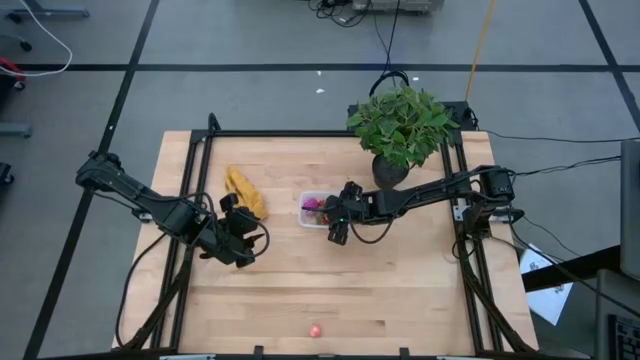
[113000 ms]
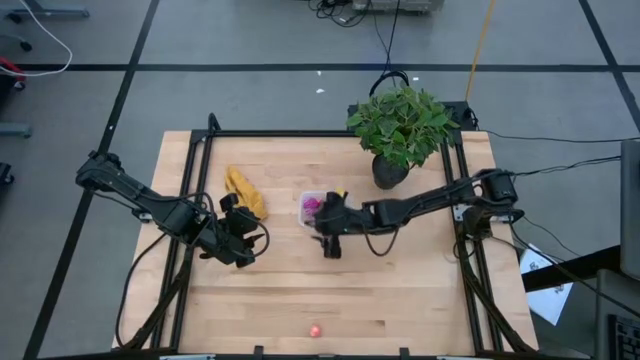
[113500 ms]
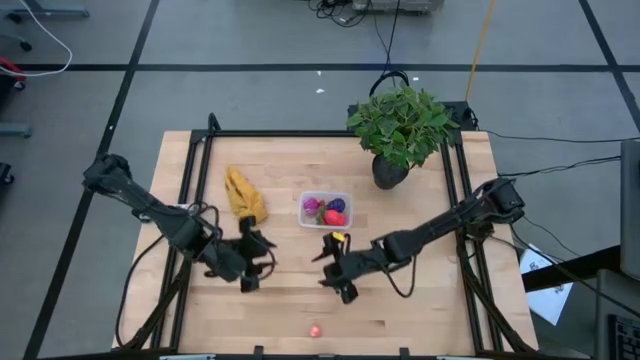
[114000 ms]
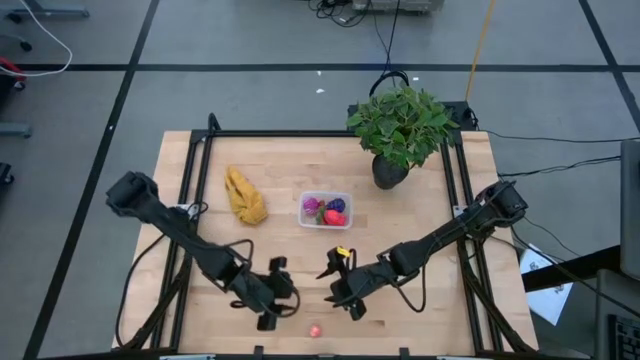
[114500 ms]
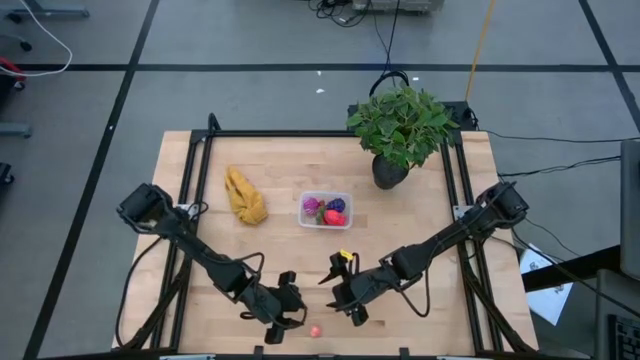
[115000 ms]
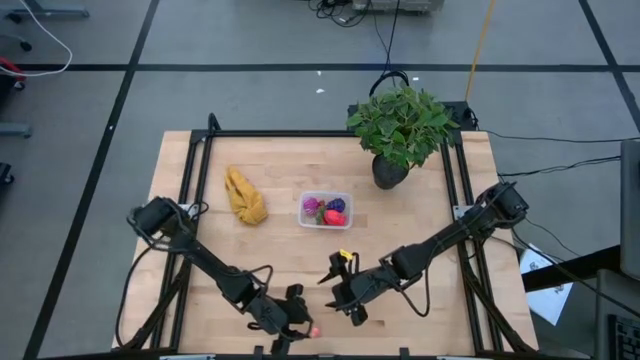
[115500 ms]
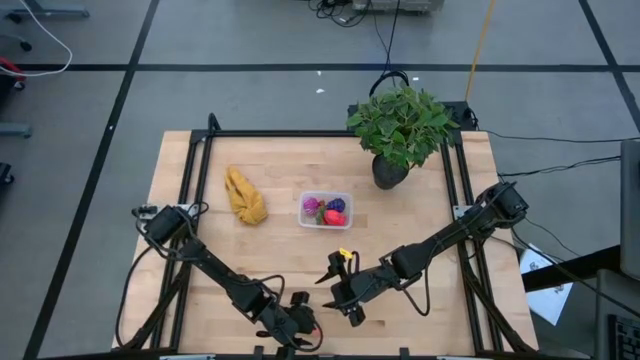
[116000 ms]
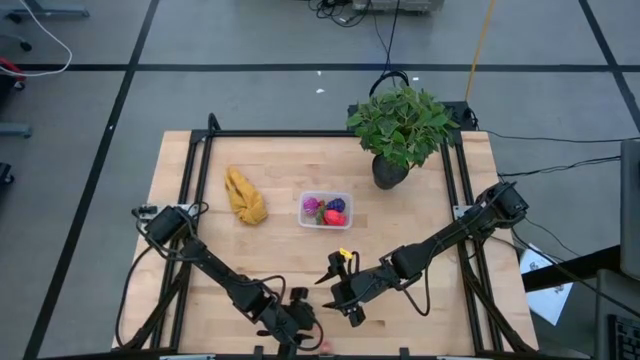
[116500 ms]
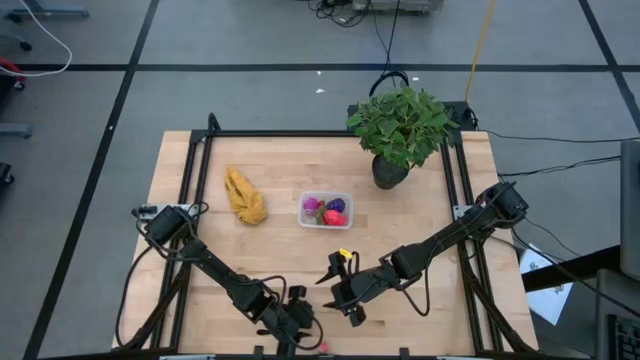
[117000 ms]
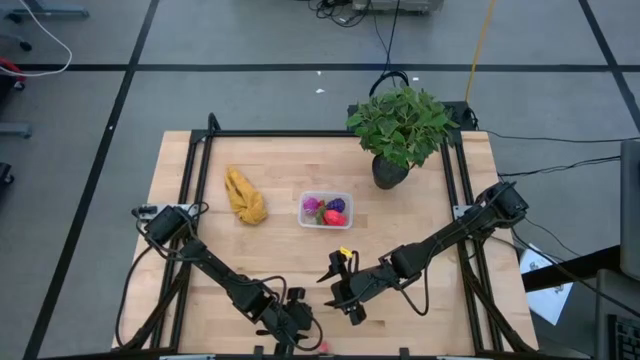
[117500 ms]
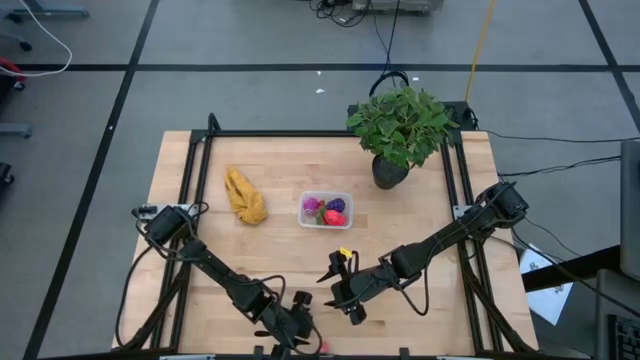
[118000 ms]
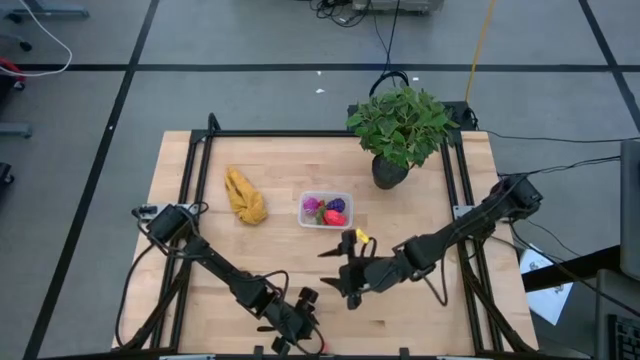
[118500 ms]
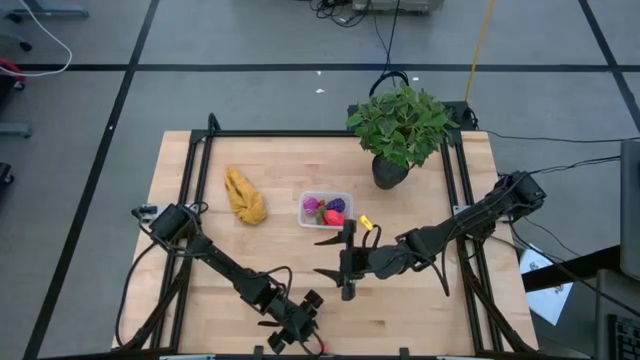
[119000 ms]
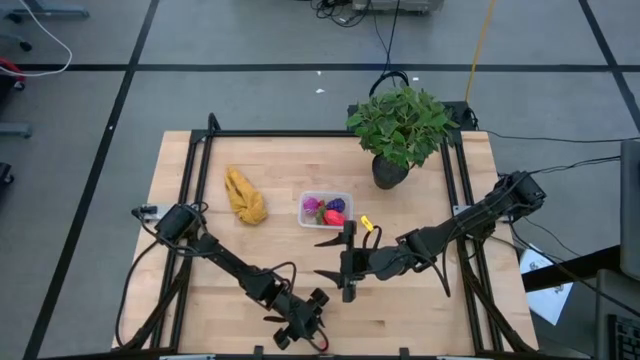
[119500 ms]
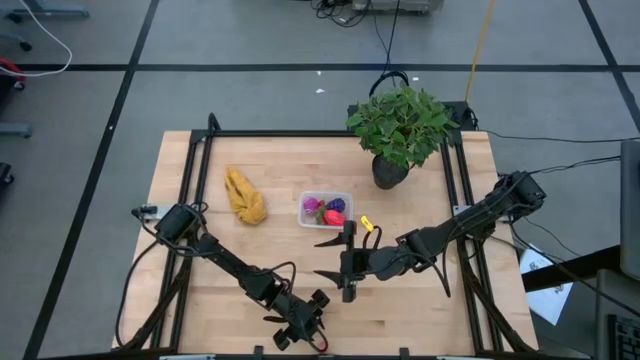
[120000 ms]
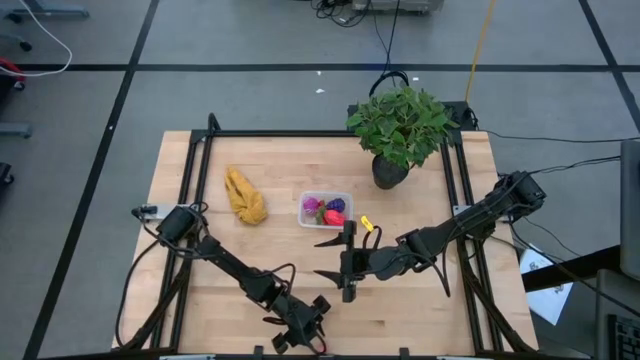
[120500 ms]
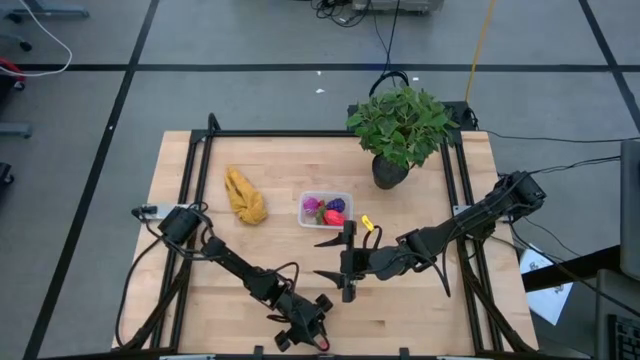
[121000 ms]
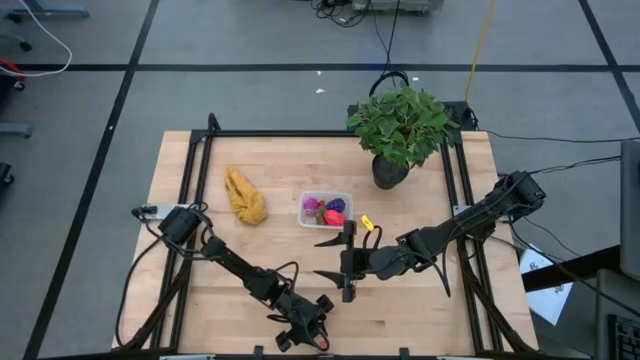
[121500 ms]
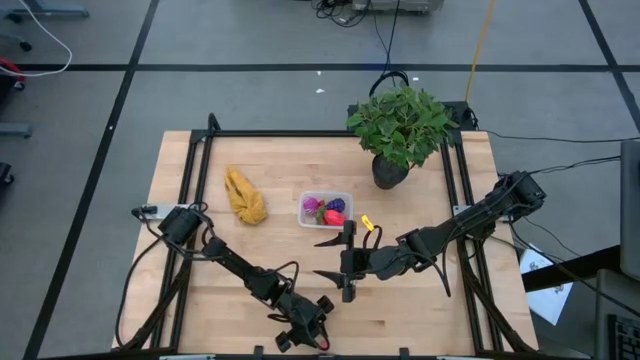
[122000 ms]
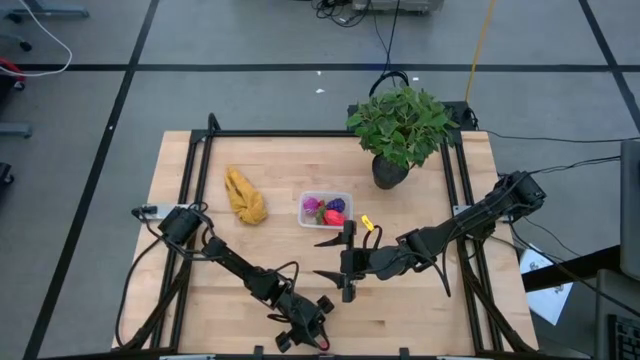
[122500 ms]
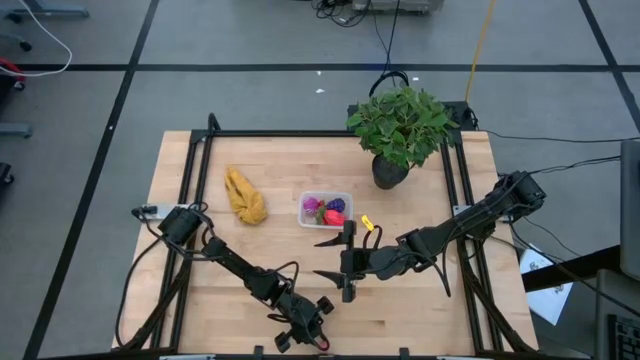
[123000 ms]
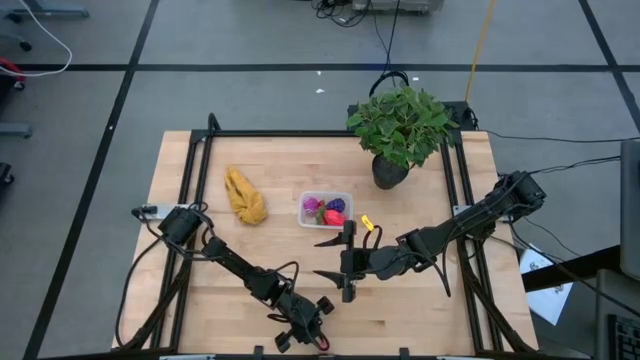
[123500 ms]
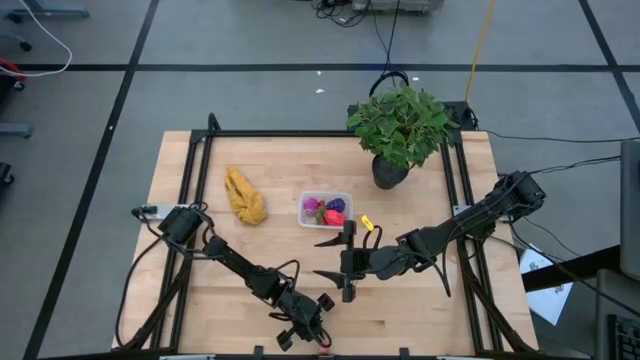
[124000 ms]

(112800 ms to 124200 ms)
Task: Pick and placing Produce into tupperware
Put the pink peach into the transparent bin

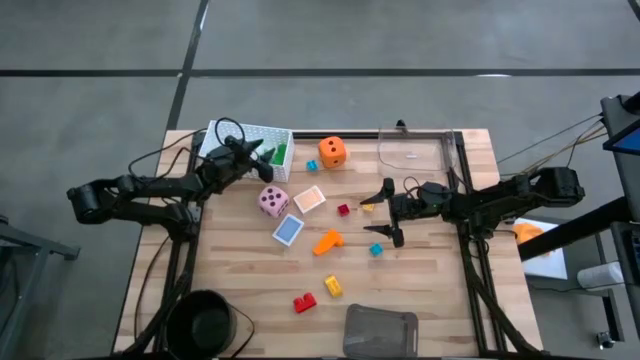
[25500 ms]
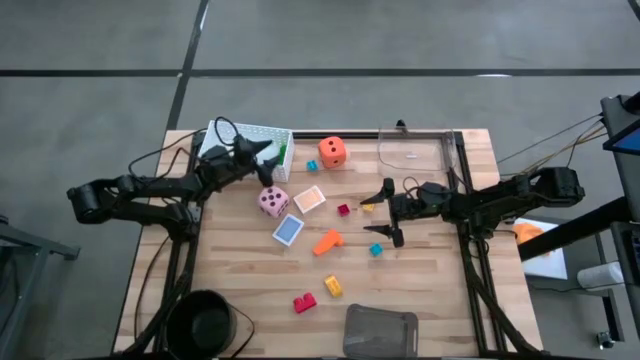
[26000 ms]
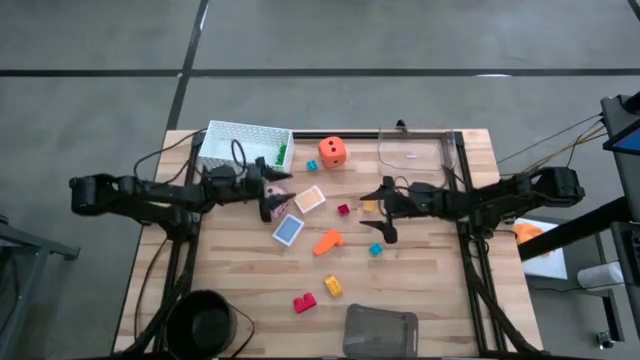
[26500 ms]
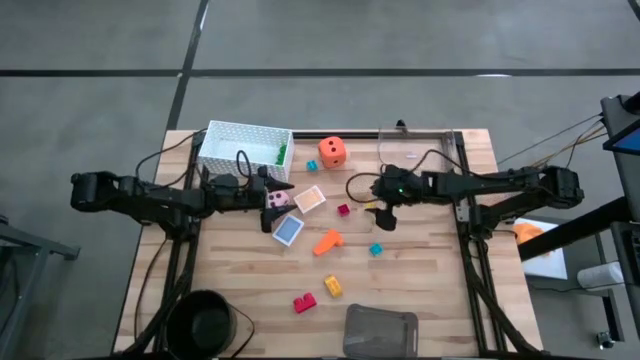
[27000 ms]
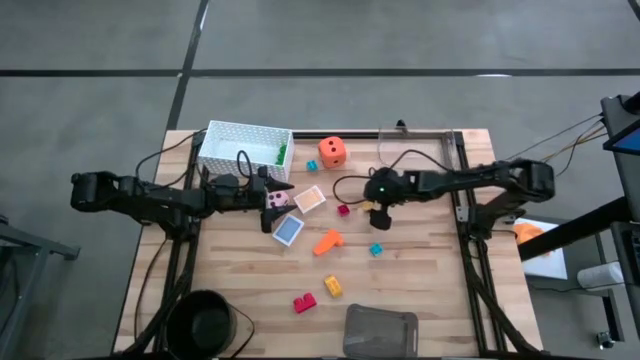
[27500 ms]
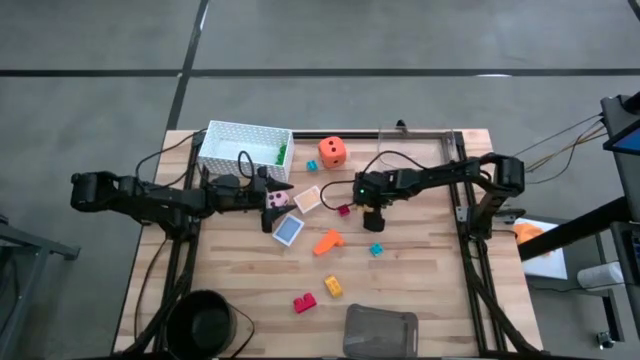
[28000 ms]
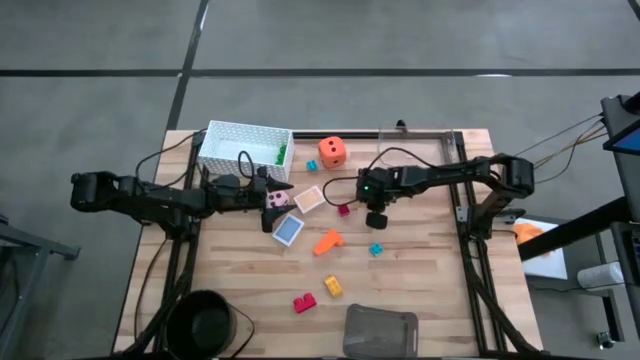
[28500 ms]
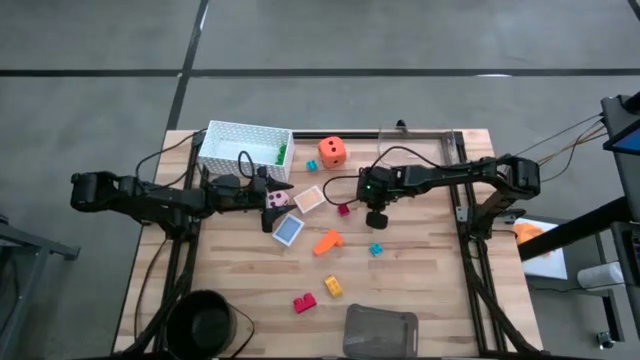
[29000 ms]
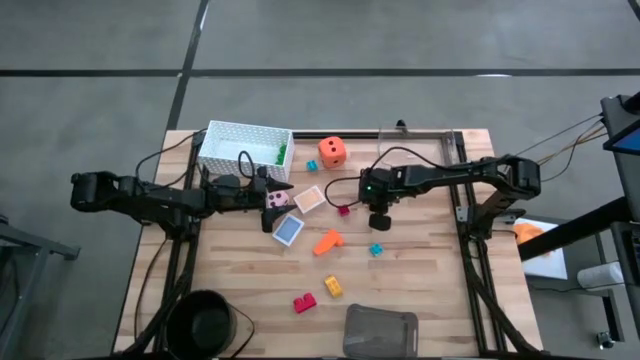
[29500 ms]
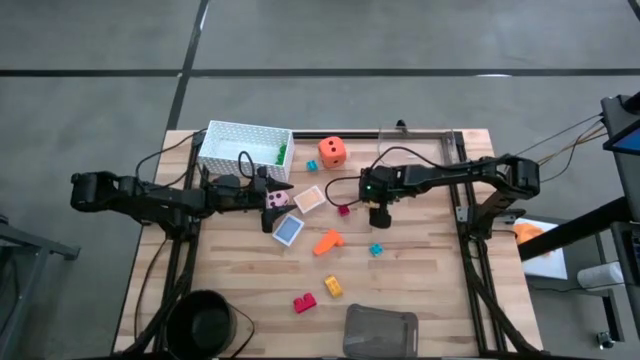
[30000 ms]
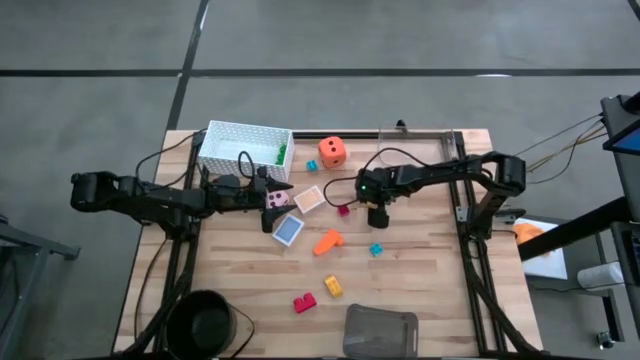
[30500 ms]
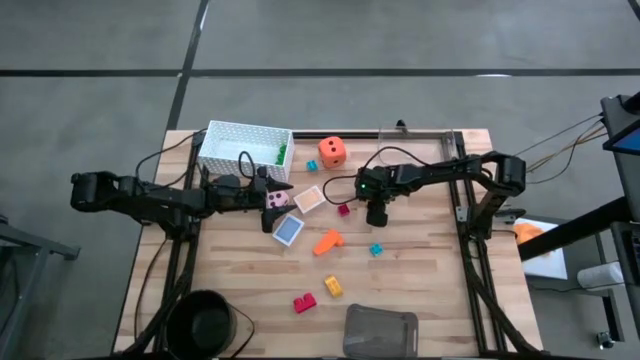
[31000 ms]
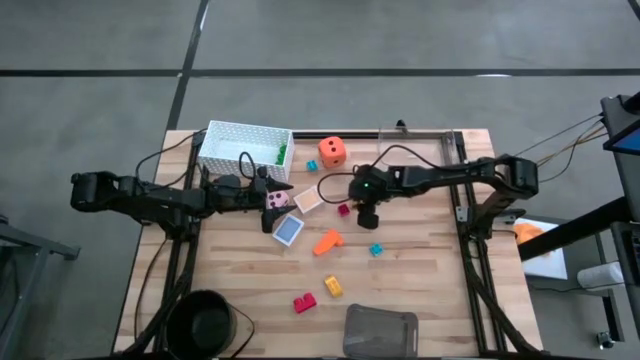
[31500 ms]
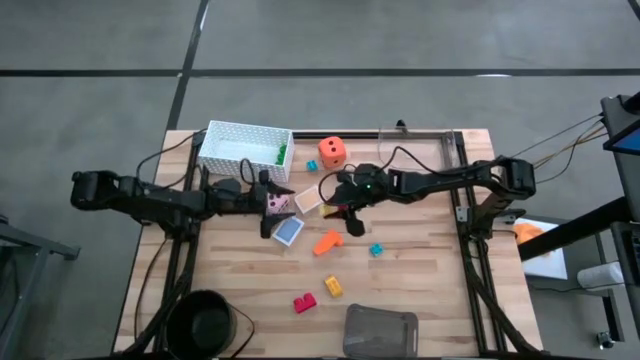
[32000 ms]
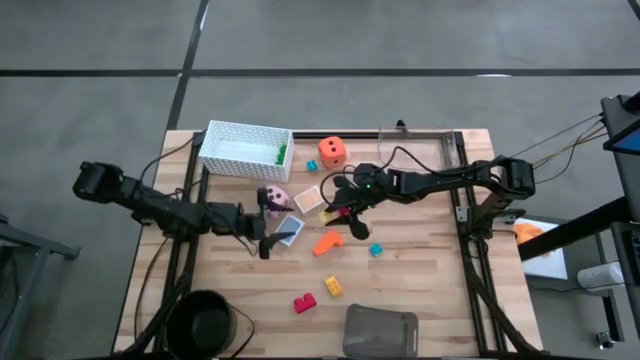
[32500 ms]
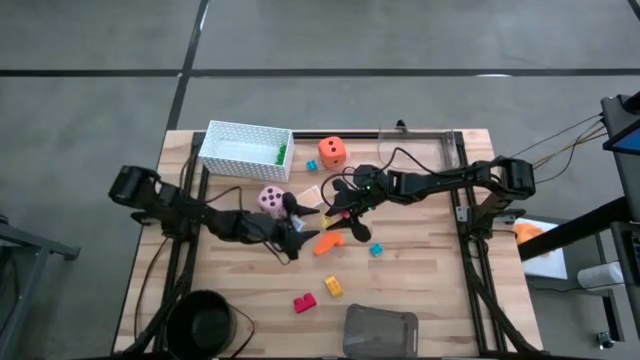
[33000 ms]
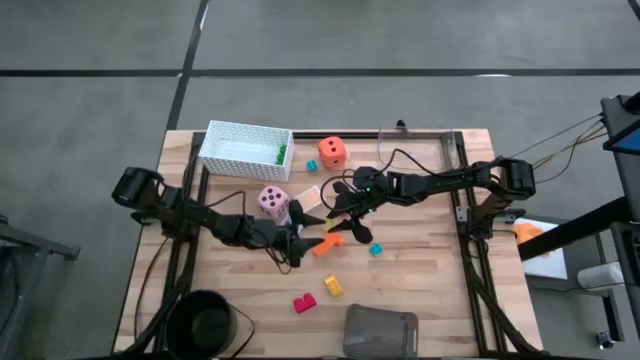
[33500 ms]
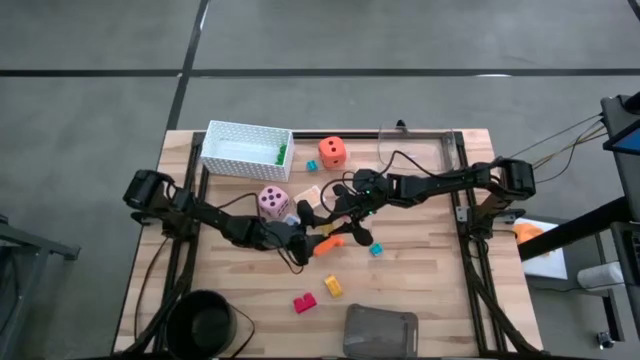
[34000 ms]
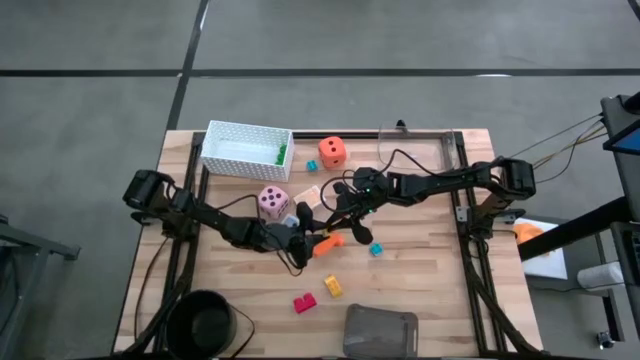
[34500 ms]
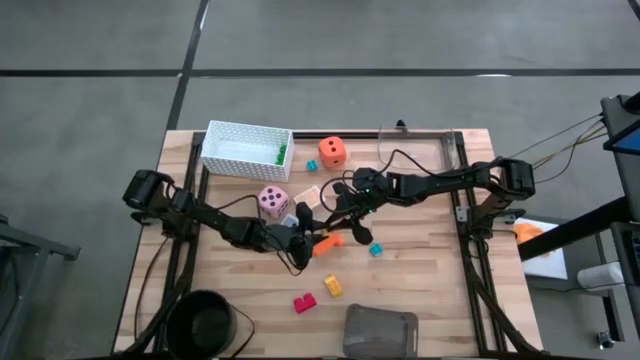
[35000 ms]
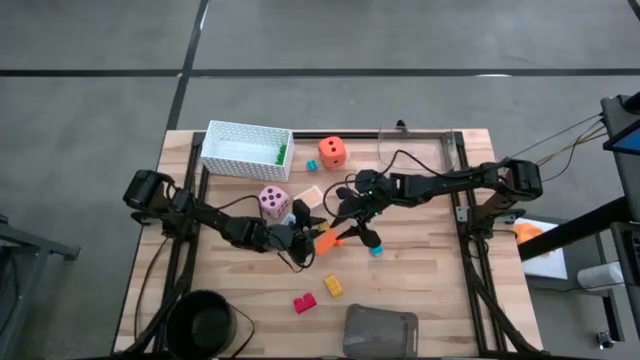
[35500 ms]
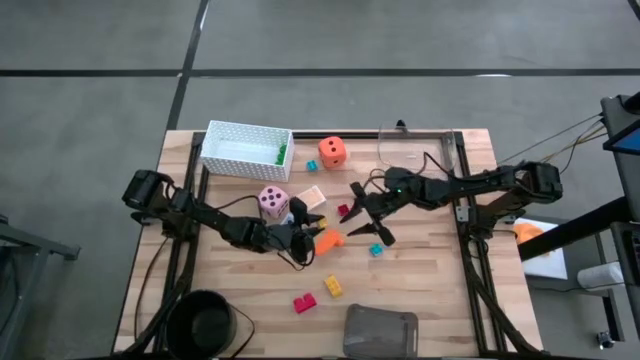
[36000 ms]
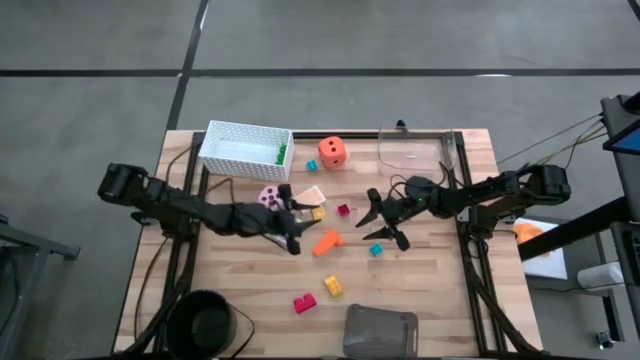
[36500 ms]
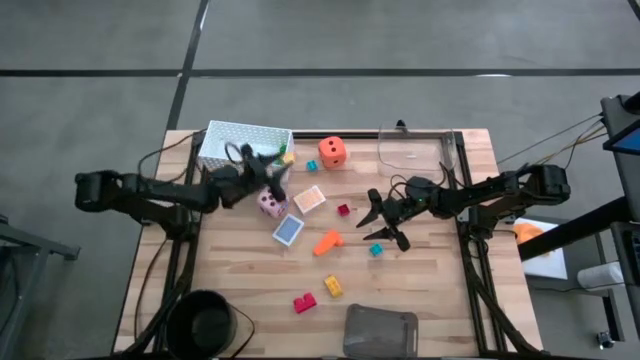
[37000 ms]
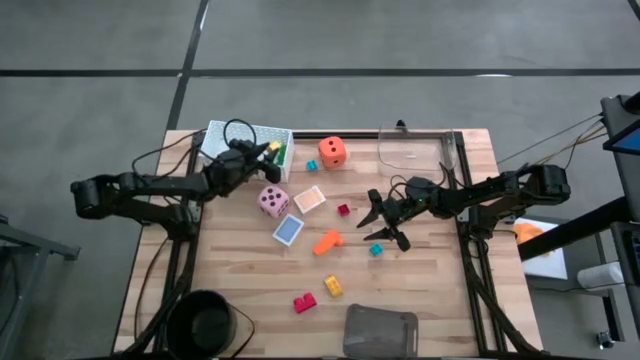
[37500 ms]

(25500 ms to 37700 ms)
Task: Pick & Place Toys
Put the small light yellow game piece into the white bin
